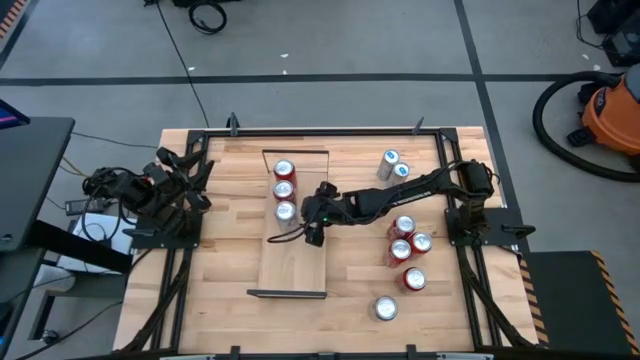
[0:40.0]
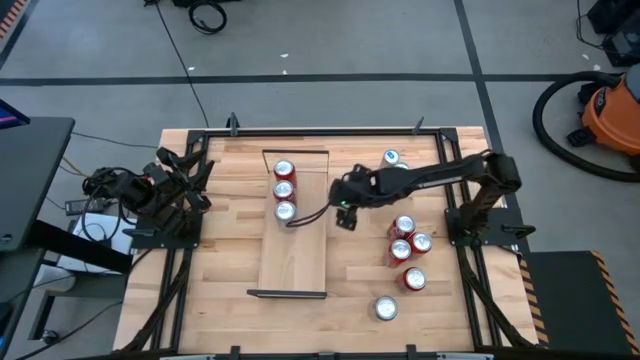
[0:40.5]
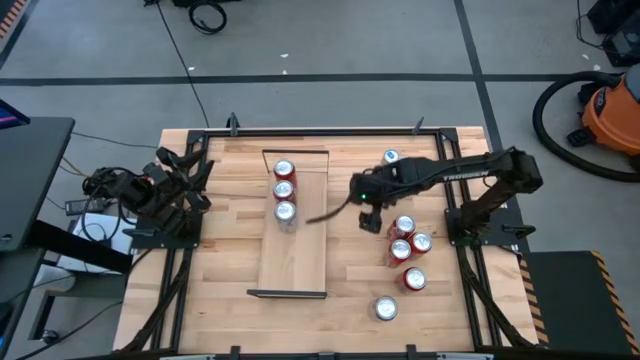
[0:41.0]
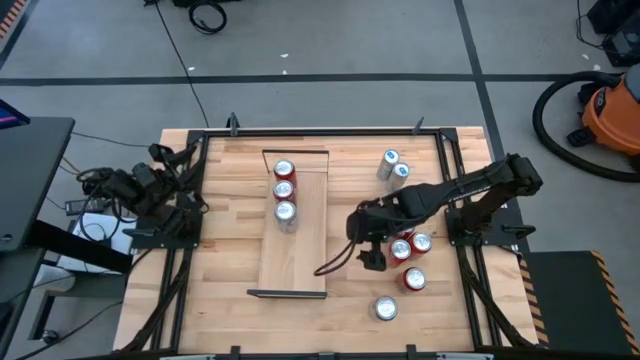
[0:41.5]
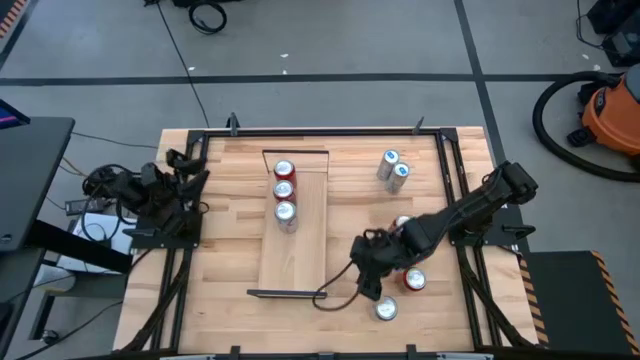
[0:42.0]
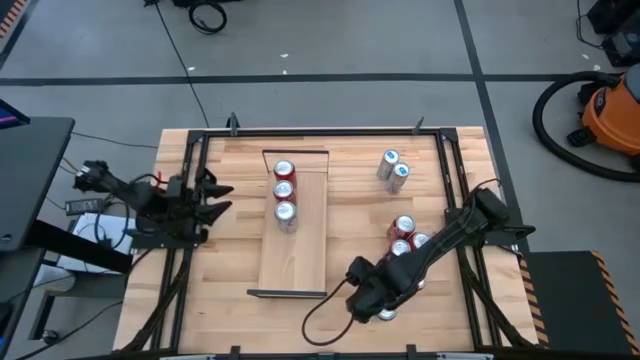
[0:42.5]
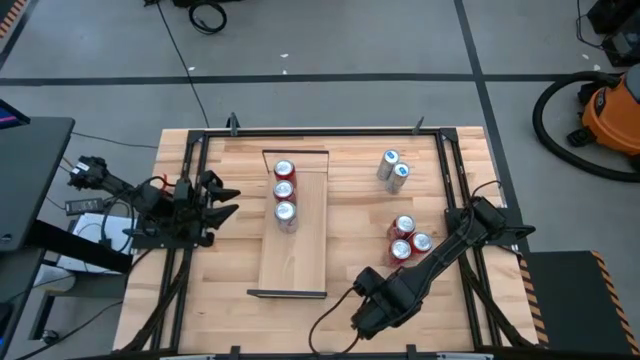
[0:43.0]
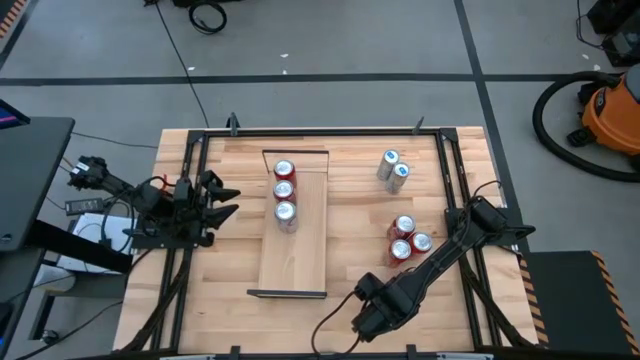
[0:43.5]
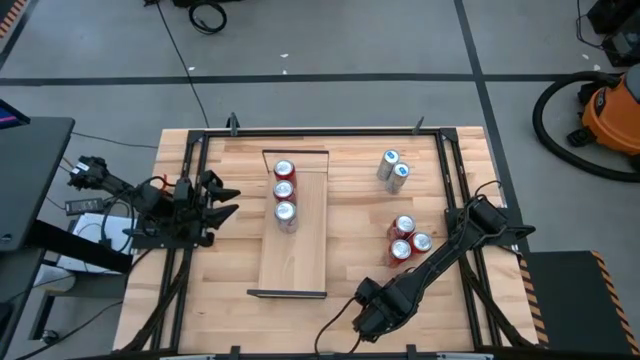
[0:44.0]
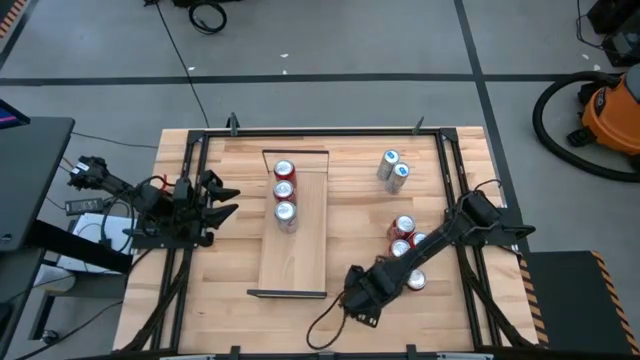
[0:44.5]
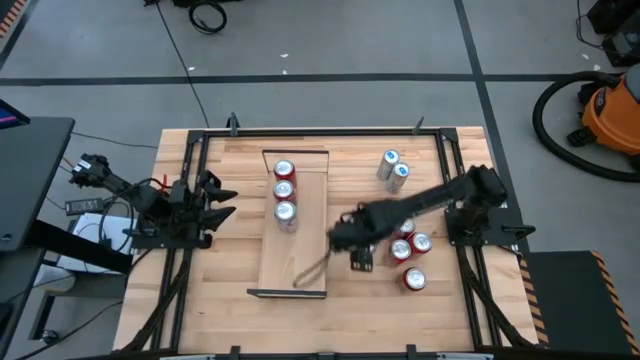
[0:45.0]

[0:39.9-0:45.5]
Task: Place canned beverage on shelf
Put the silver soda can on the shelf aligned with the silver soda can

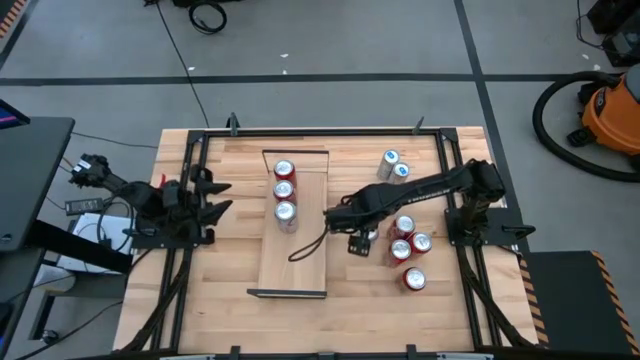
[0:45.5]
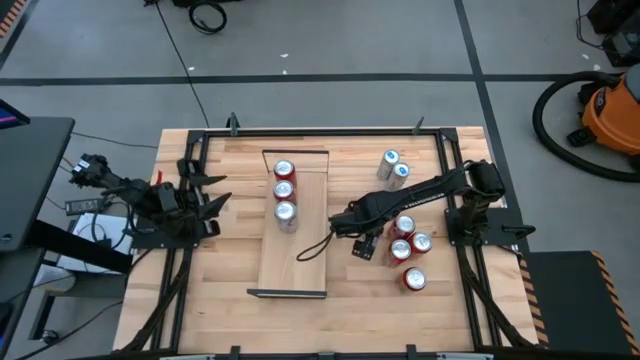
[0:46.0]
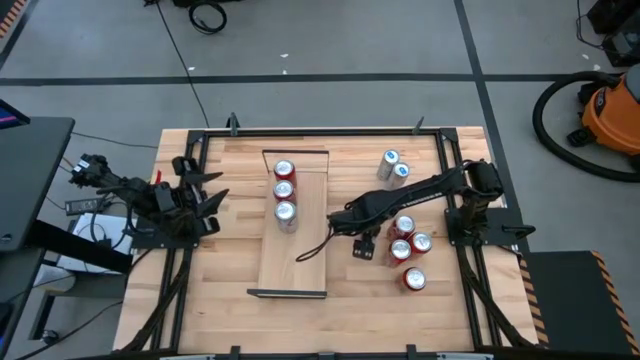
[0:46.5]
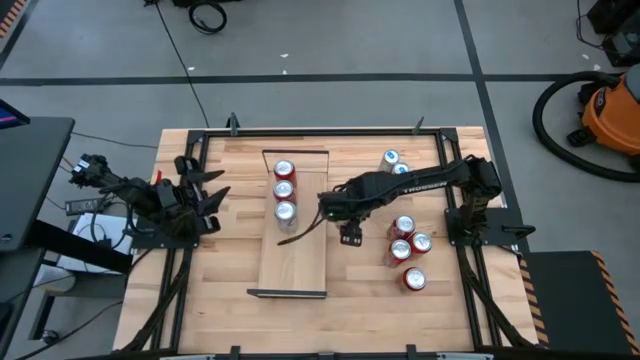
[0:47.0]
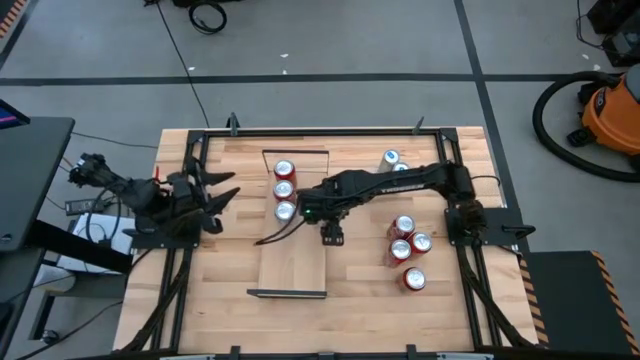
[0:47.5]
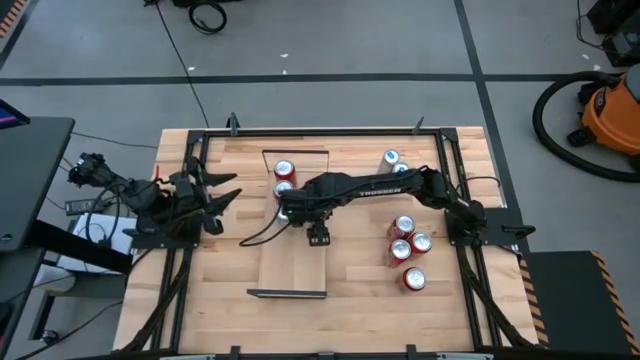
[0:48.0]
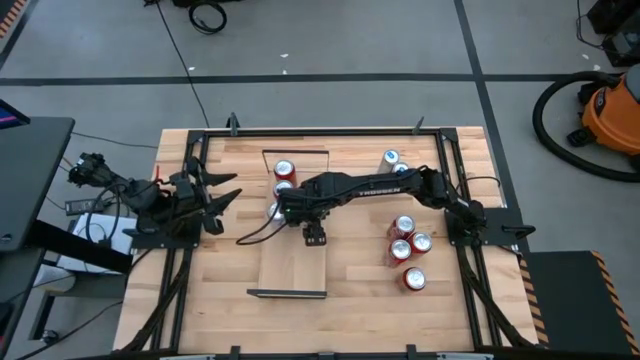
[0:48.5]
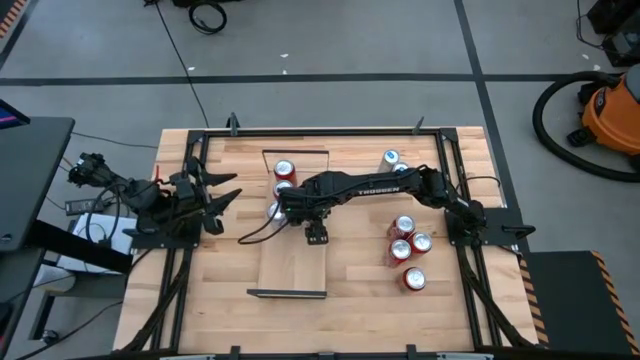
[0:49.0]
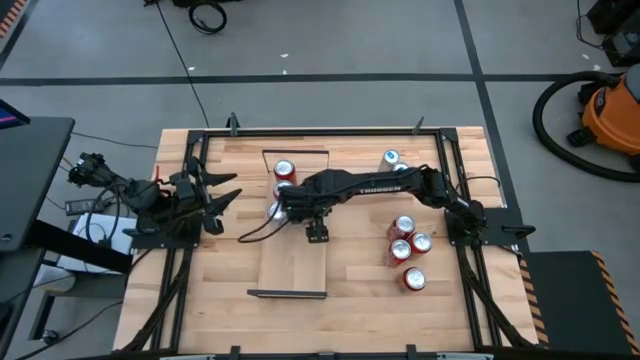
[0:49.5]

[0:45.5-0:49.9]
Put the silver soda can on the shelf aligned with the silver soda can

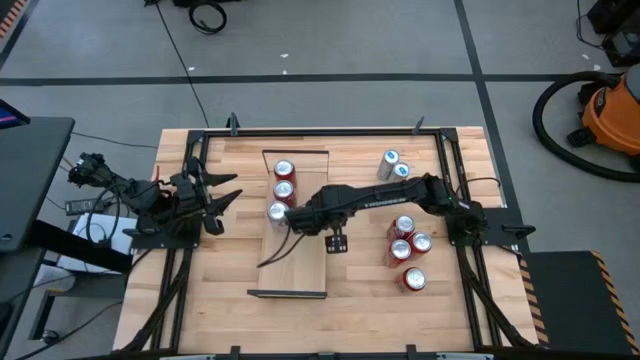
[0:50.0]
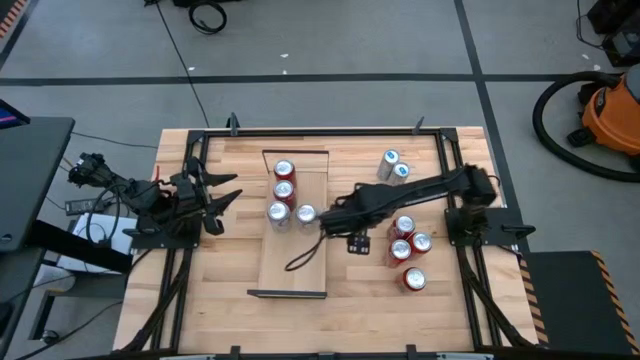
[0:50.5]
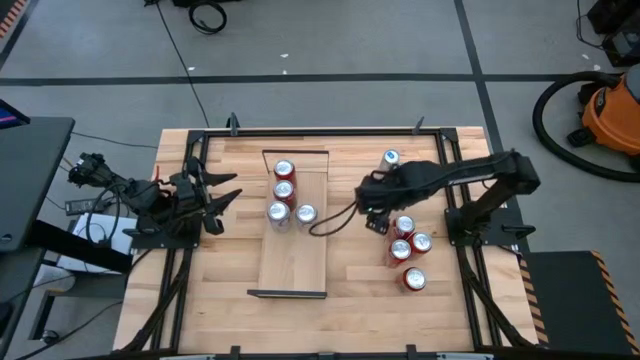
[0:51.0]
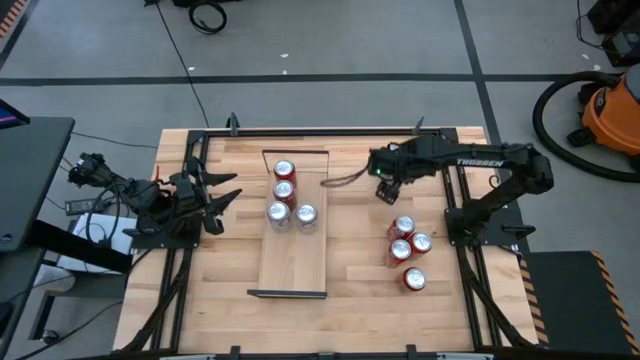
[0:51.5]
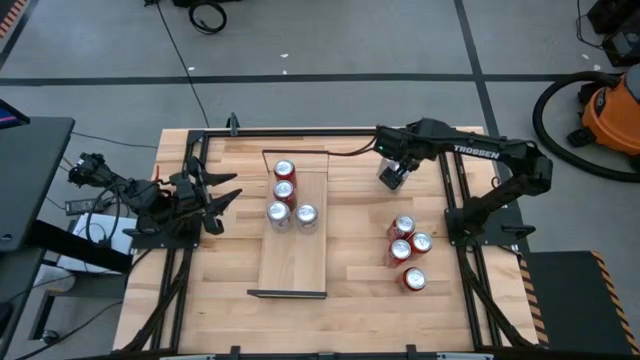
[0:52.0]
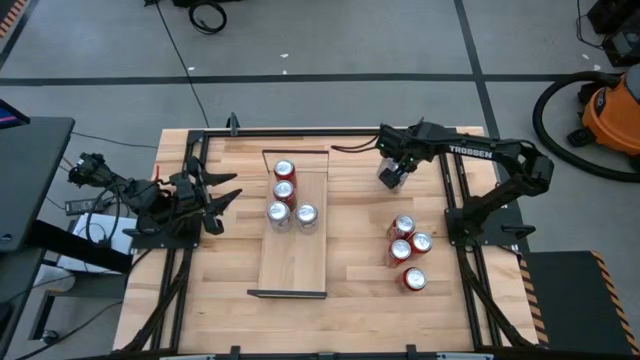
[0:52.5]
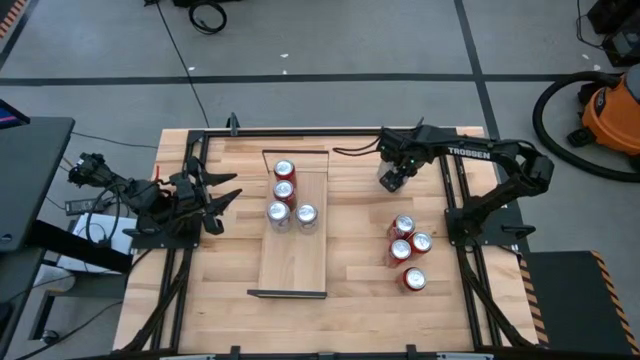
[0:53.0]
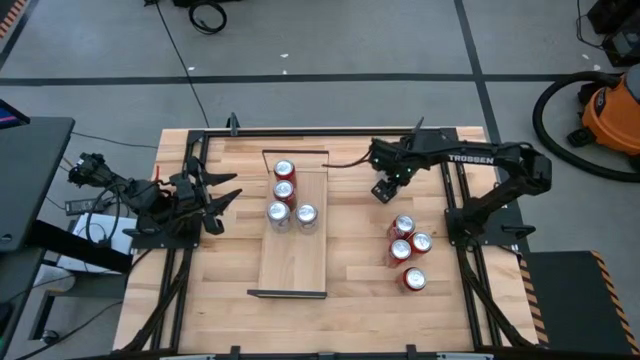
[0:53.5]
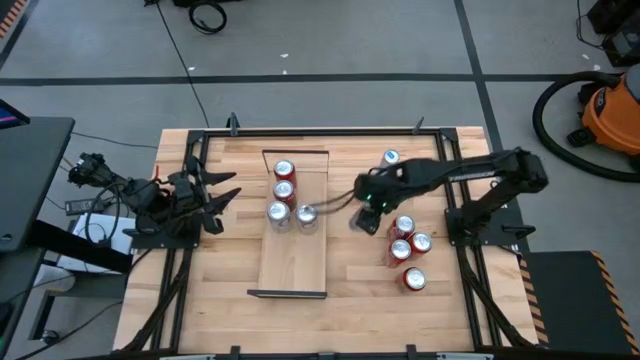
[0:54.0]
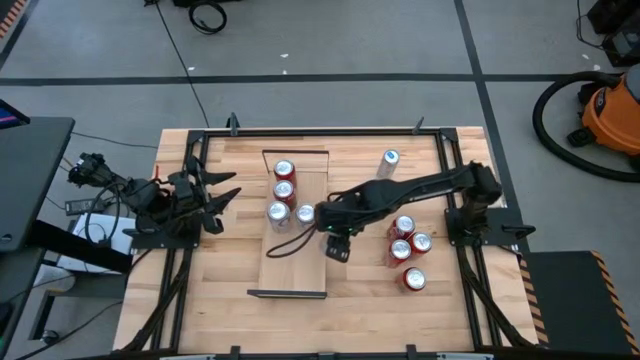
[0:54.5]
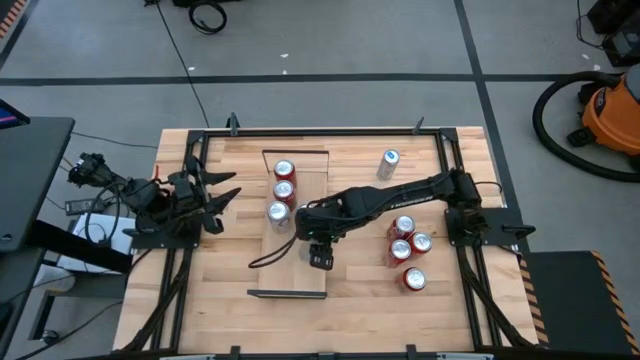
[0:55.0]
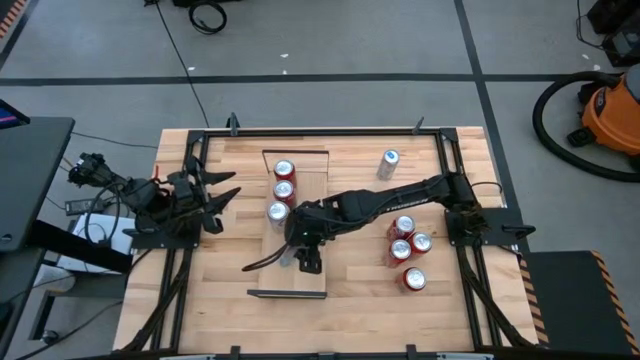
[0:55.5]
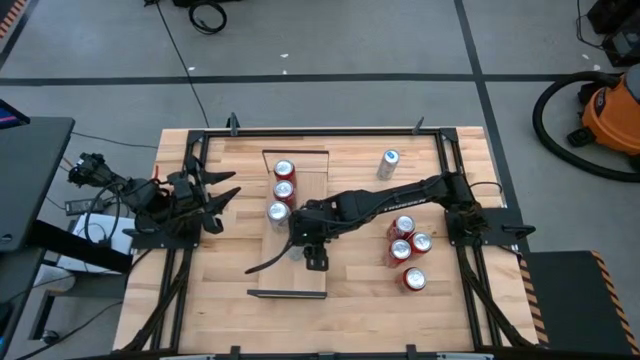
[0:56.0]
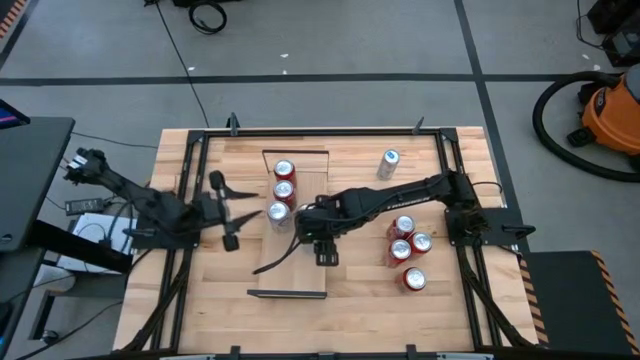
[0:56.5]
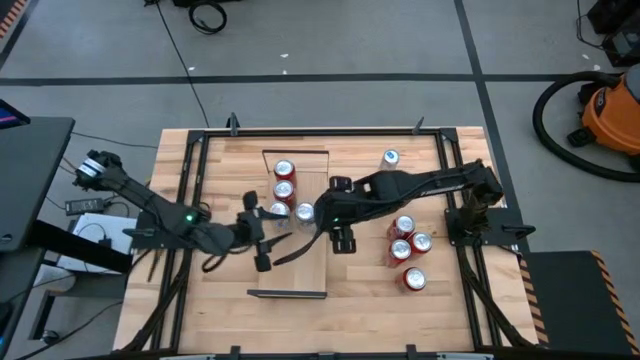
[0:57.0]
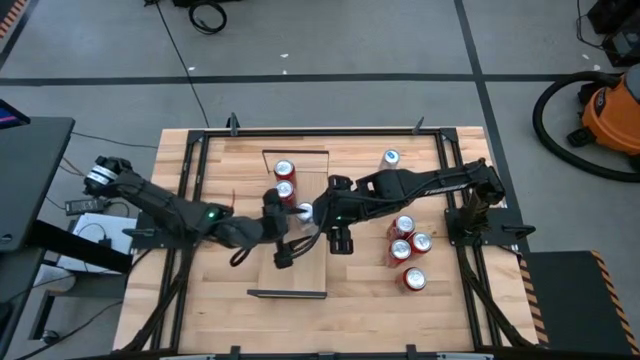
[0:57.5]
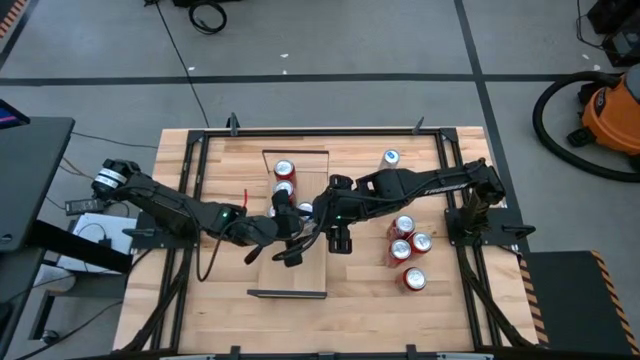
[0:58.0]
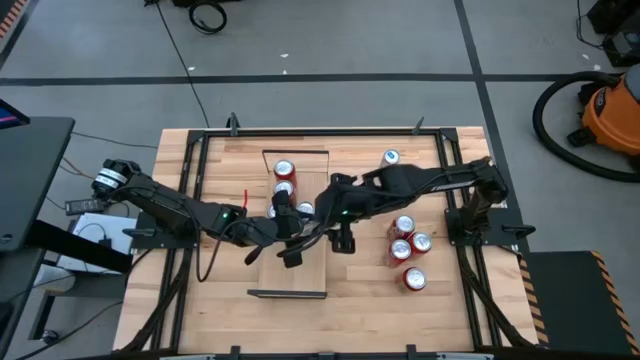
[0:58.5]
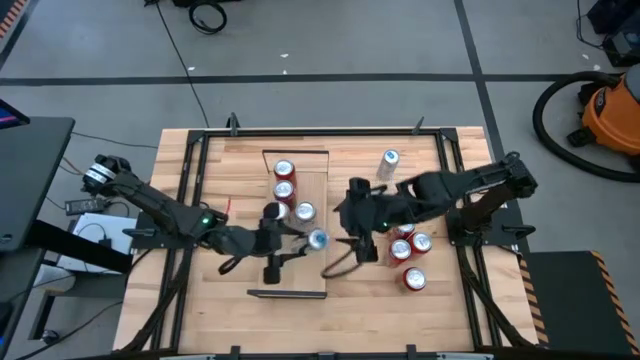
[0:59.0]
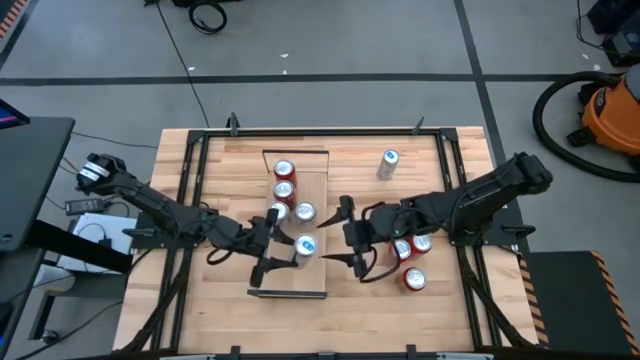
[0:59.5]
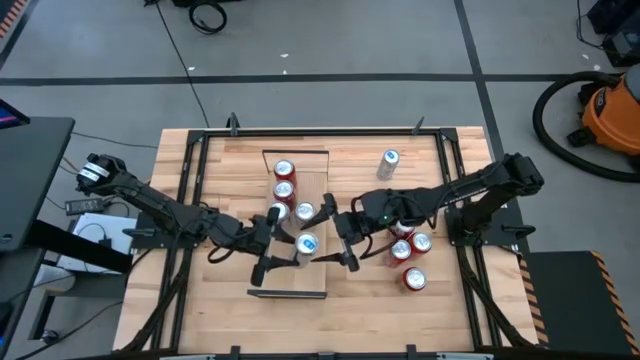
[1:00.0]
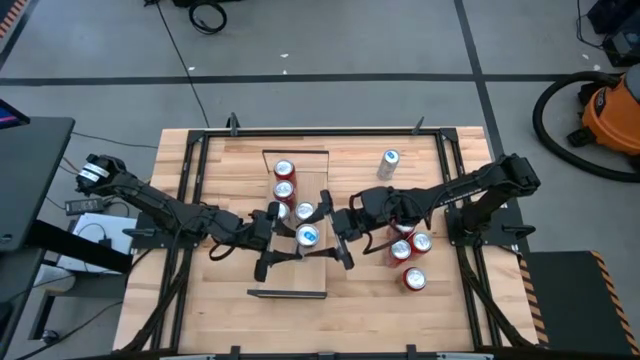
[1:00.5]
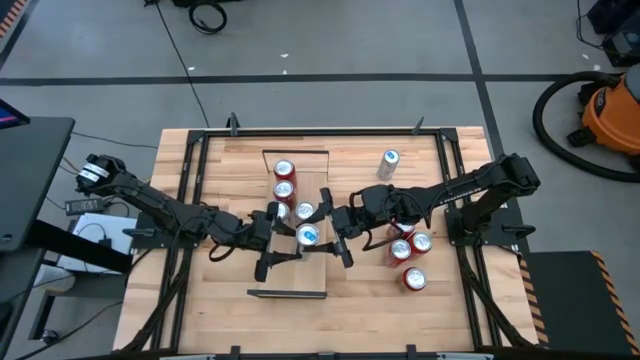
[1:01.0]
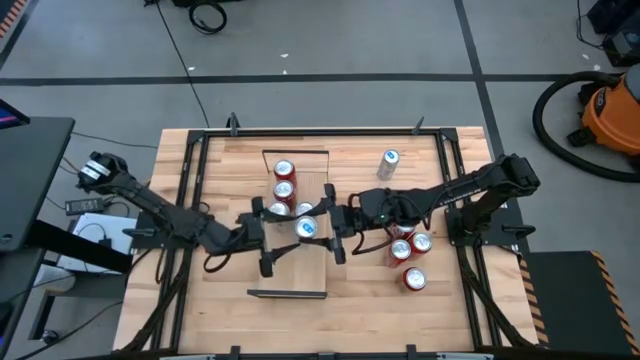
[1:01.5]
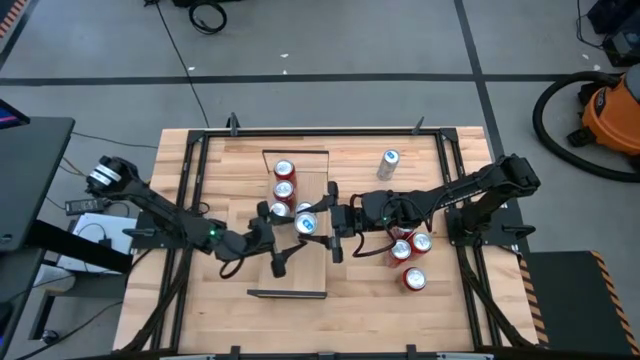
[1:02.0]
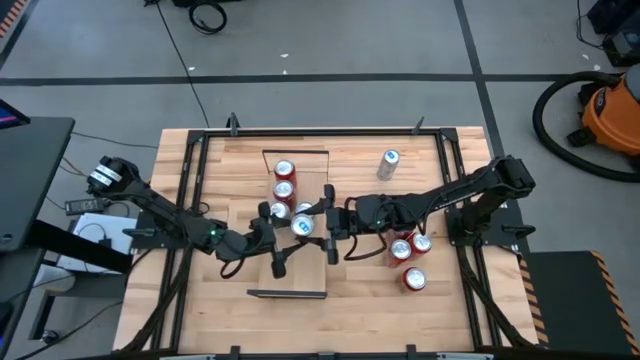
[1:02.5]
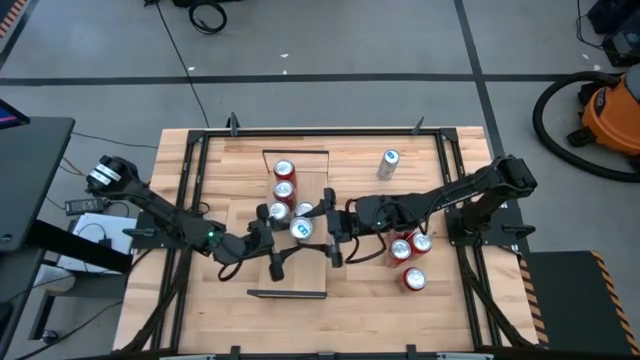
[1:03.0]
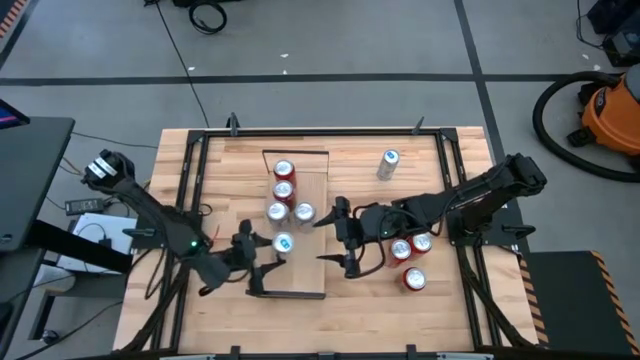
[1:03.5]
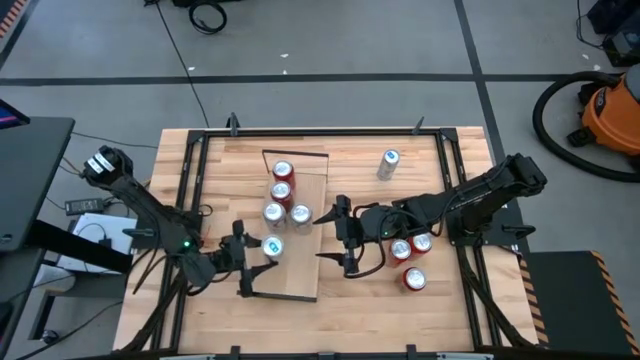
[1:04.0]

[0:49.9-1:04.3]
Put the bottom blue soda can on the shelf
